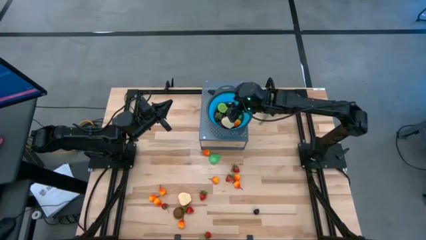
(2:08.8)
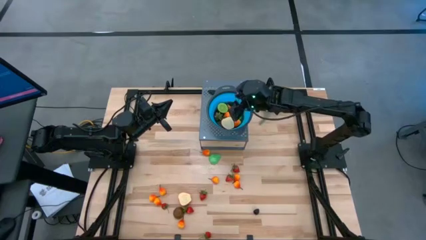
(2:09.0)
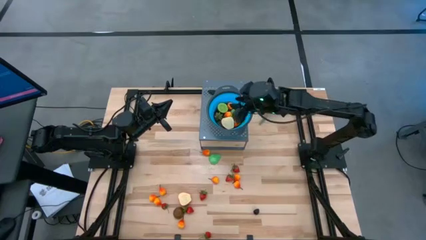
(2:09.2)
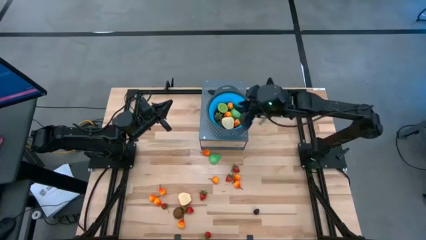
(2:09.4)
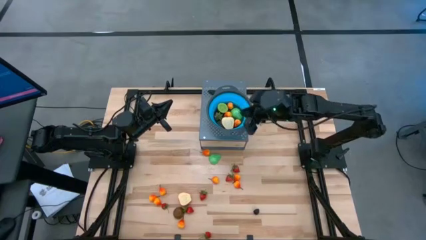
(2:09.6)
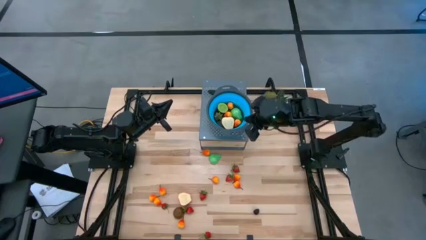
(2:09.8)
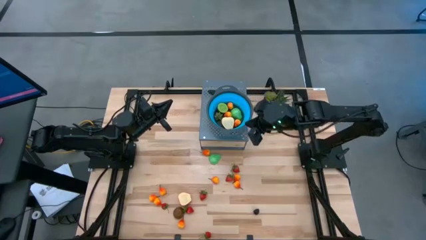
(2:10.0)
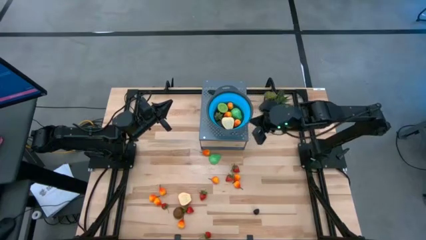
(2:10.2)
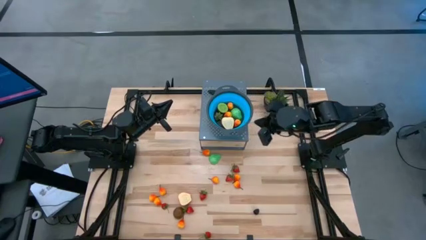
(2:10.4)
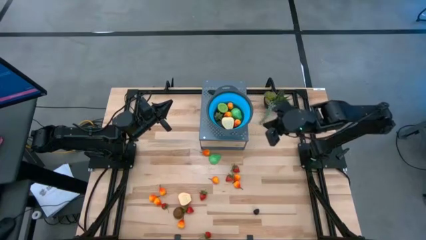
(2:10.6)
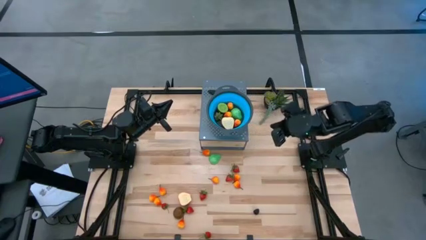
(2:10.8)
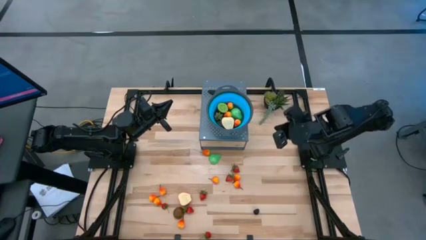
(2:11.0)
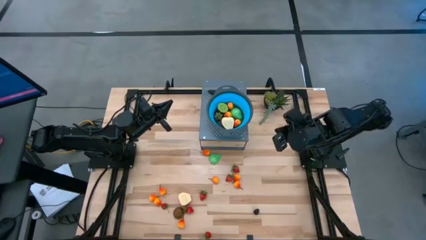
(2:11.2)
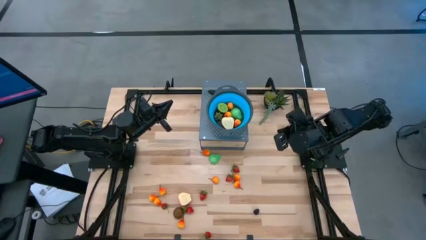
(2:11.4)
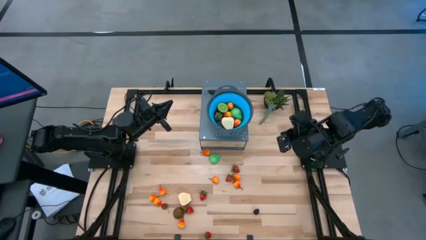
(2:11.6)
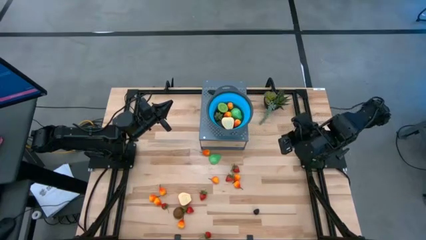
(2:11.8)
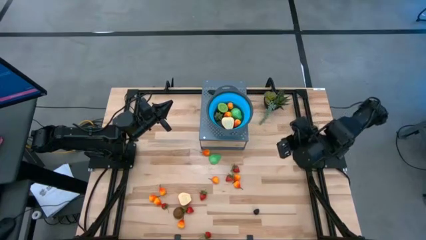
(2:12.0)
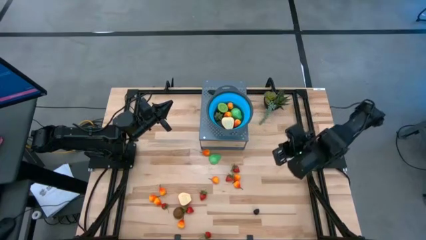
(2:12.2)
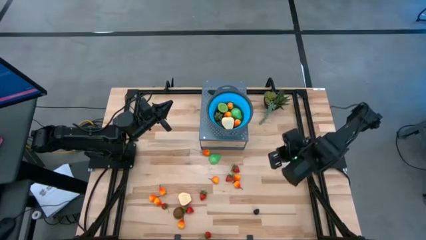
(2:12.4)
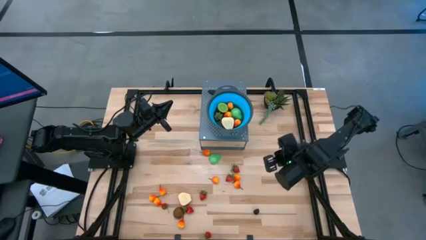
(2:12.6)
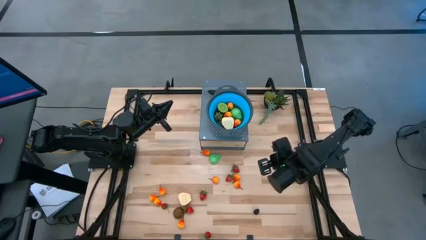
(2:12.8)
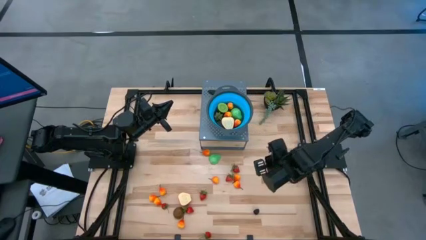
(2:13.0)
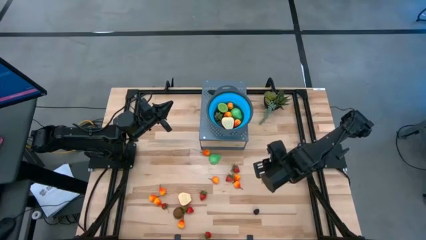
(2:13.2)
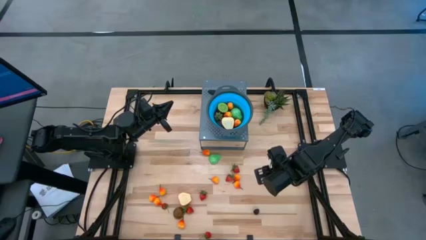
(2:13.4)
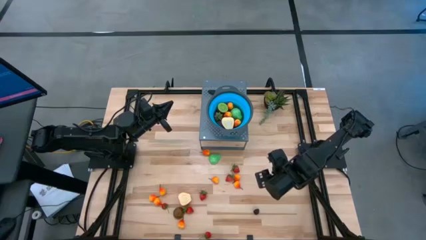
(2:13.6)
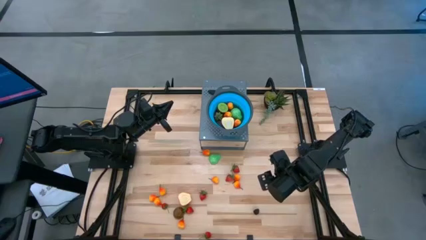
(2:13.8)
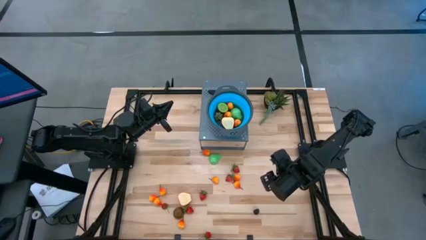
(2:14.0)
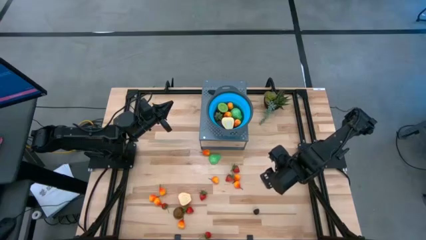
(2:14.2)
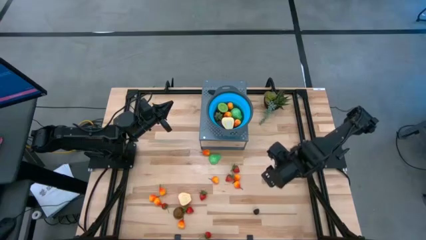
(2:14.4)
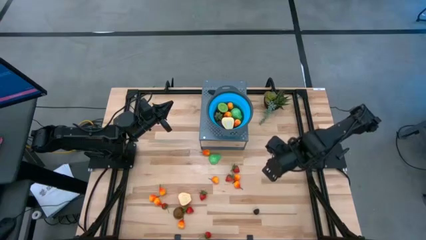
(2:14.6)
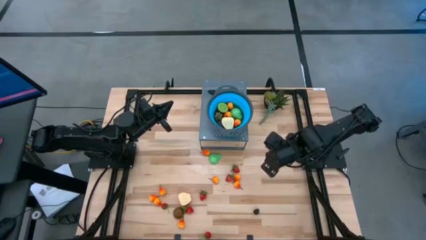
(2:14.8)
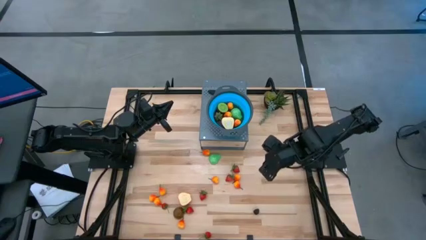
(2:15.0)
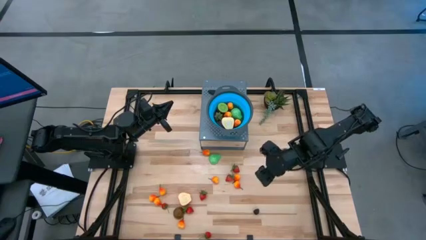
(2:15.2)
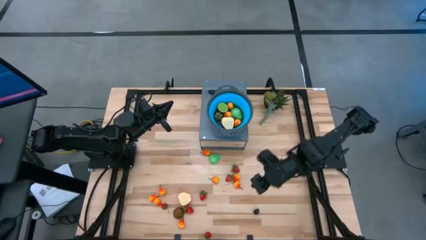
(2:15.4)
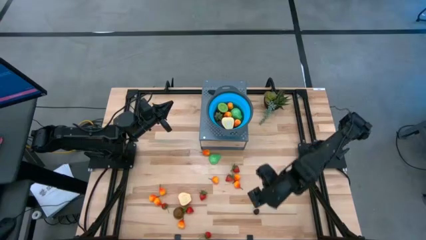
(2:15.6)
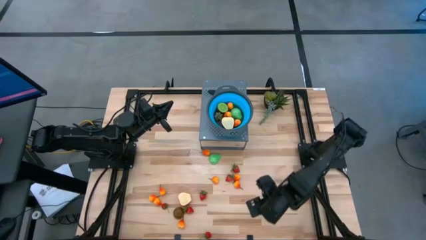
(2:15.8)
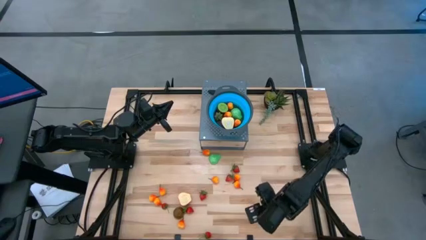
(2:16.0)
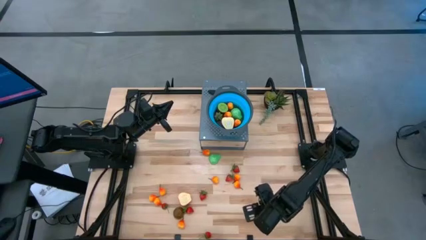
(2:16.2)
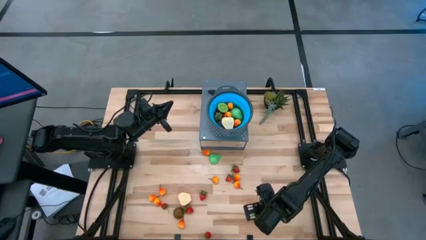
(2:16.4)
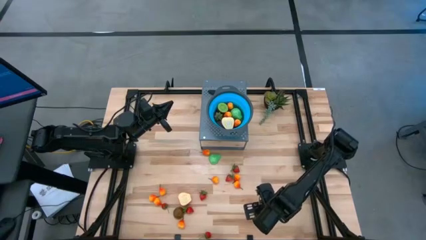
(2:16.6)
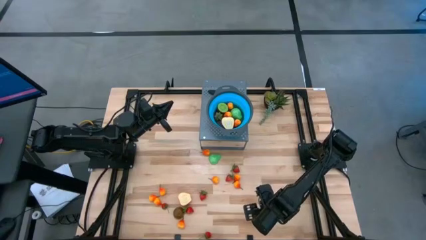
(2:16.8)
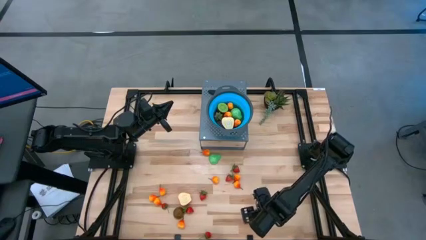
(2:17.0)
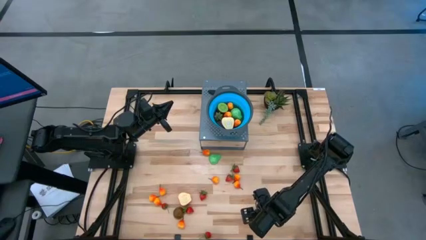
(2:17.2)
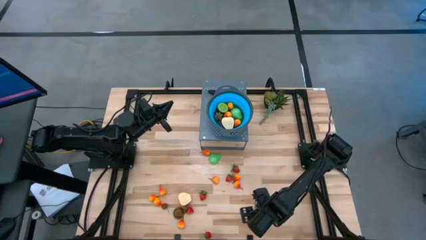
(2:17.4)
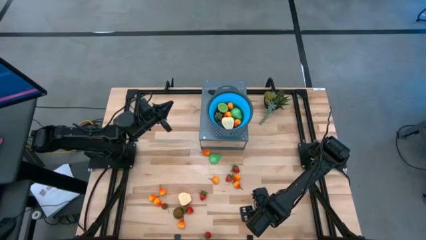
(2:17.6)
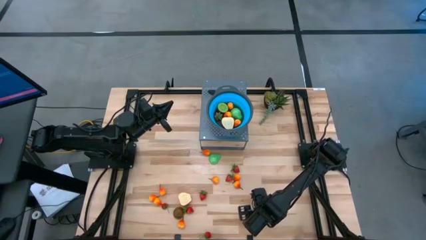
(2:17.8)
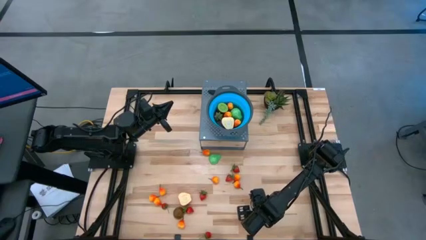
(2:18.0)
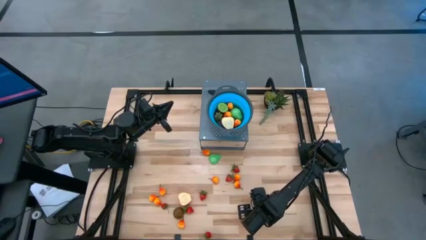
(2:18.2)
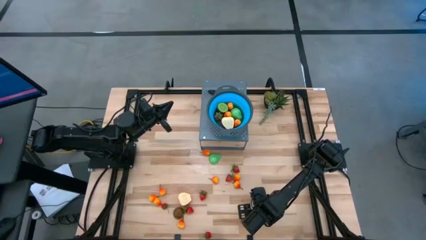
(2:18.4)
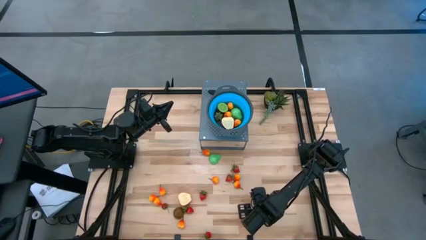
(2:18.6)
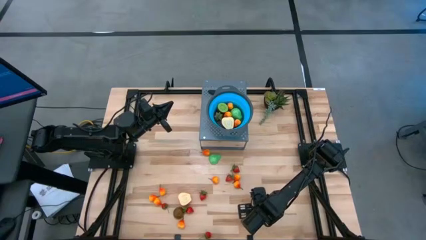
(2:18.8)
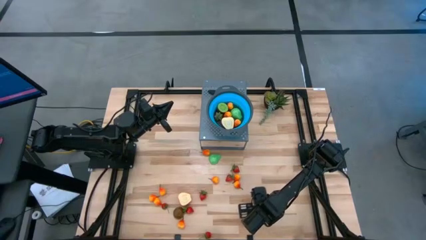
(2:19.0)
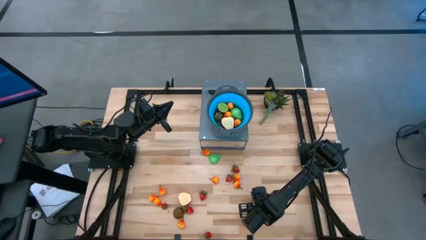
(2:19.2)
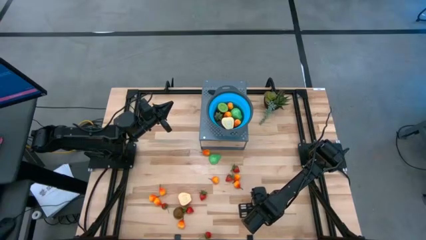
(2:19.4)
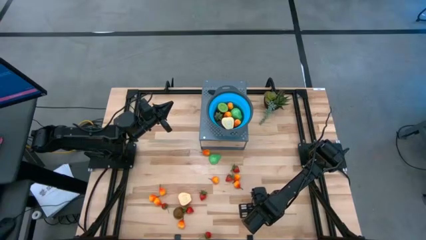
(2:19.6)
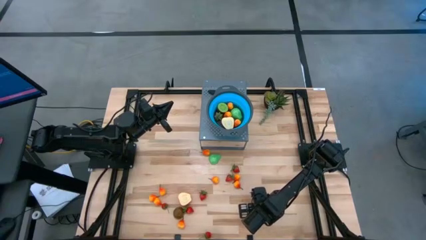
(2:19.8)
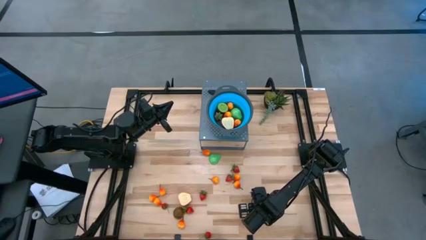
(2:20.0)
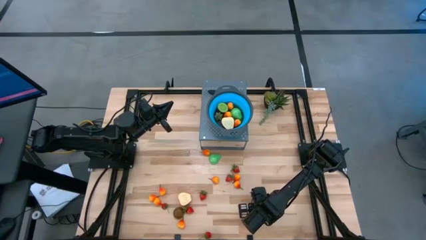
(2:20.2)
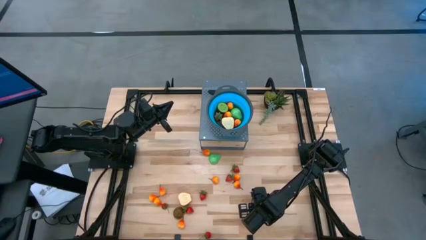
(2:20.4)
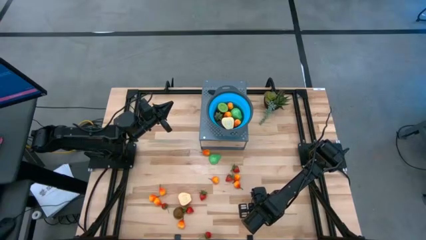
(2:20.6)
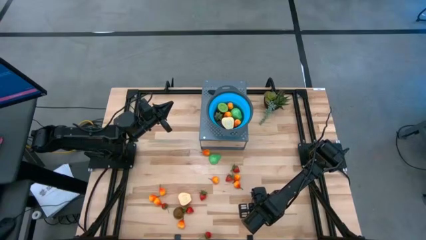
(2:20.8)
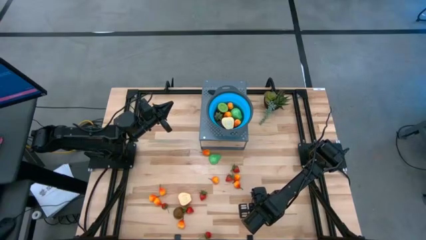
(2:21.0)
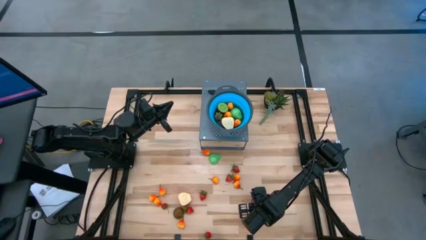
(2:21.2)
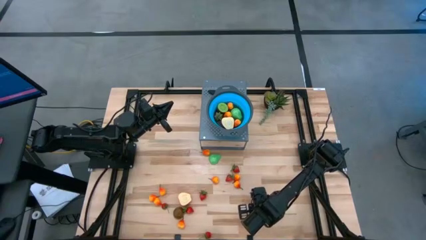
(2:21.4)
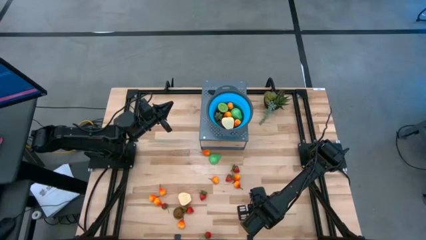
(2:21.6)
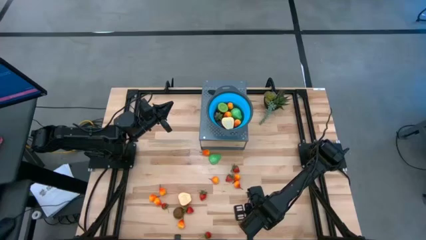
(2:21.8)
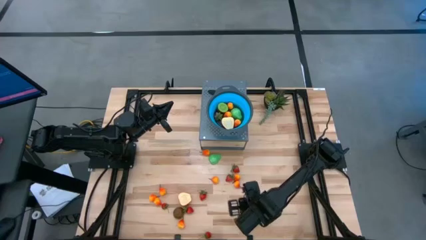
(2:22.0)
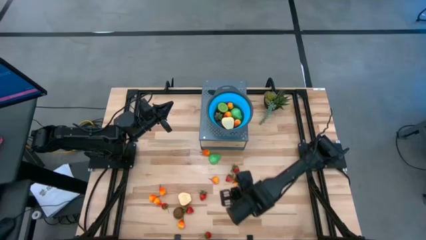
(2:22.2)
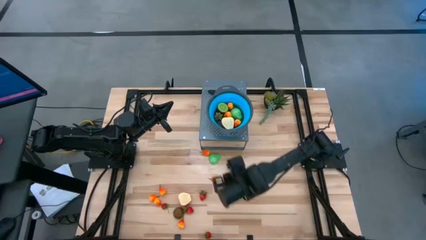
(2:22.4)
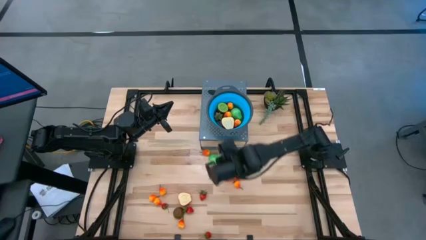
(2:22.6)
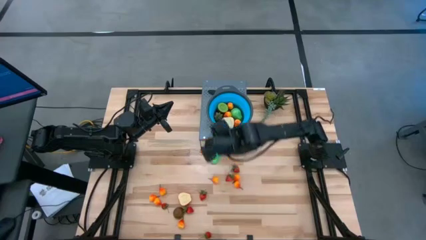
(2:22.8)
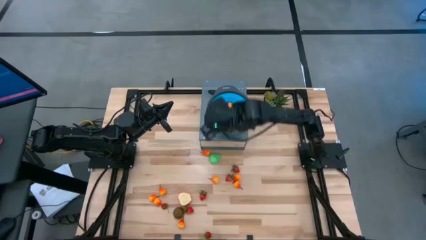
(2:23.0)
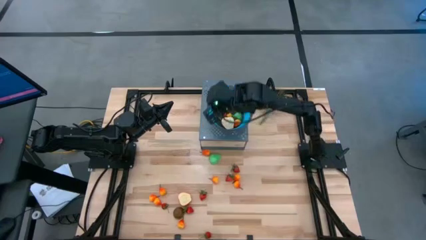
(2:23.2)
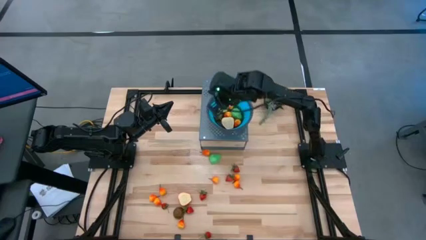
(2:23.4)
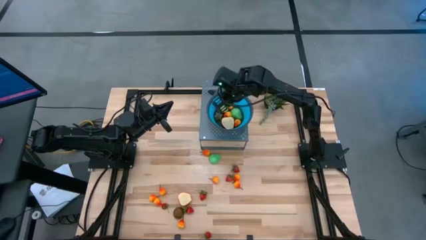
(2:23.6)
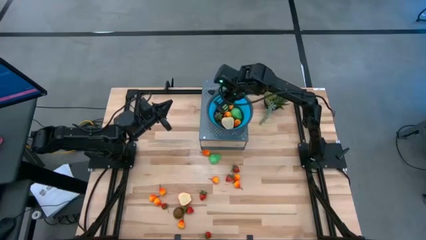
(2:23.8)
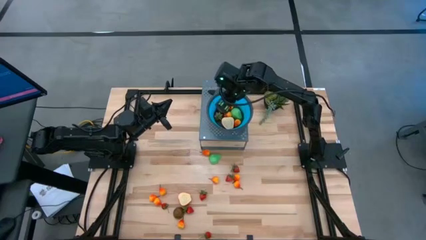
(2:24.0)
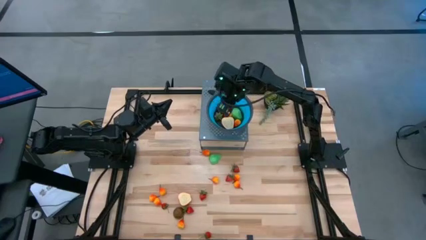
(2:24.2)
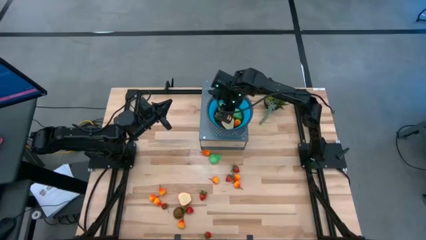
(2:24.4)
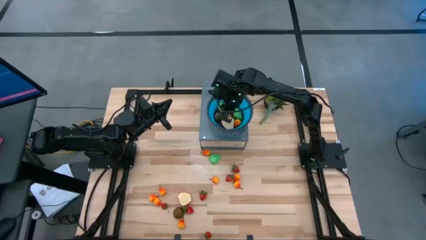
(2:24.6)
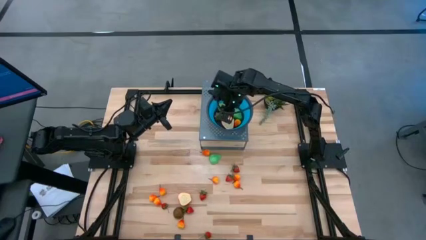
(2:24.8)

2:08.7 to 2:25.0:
Task: Pick & Place Fruit
Put the blackberry into the strainer bowl
